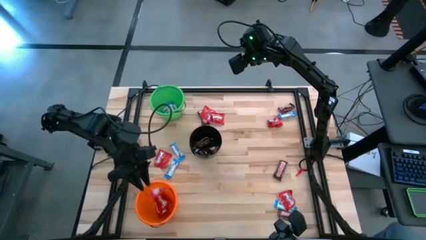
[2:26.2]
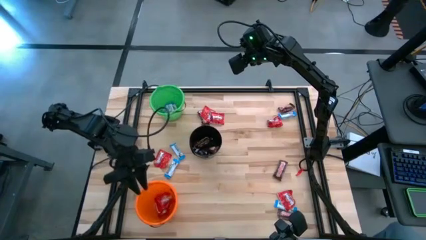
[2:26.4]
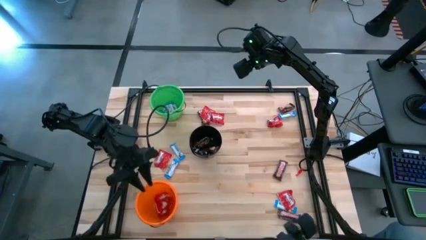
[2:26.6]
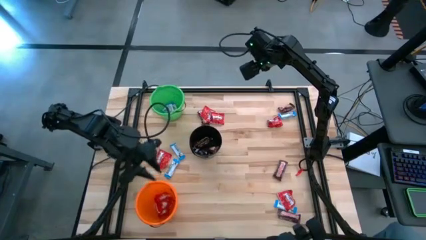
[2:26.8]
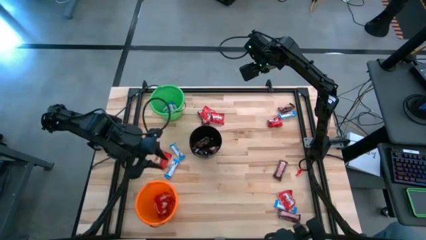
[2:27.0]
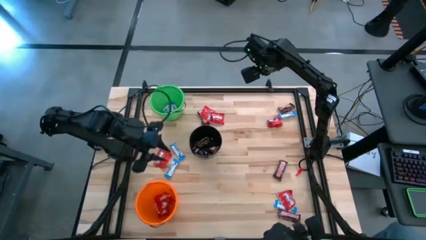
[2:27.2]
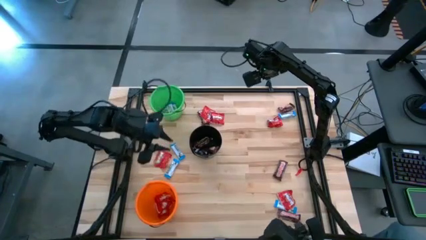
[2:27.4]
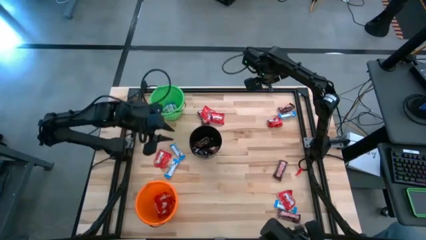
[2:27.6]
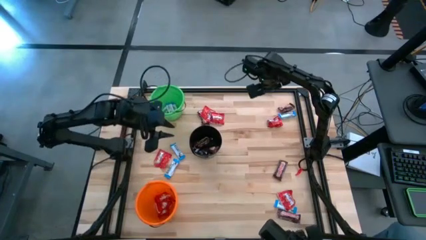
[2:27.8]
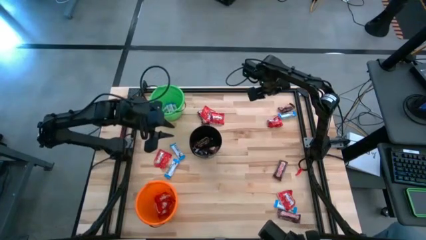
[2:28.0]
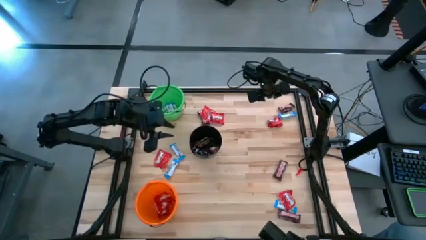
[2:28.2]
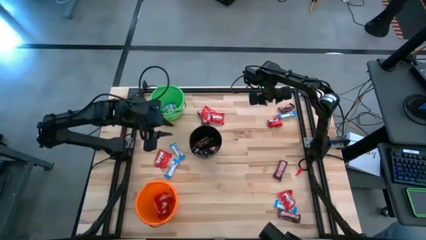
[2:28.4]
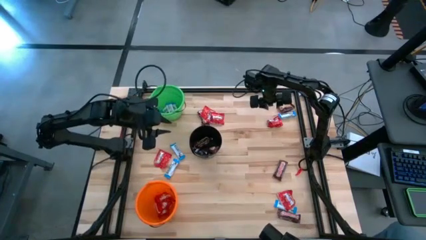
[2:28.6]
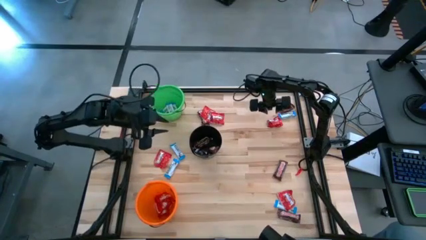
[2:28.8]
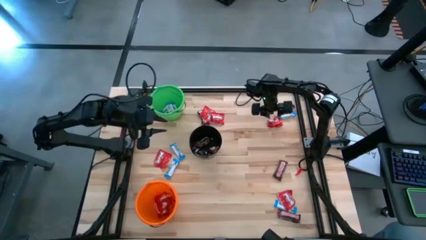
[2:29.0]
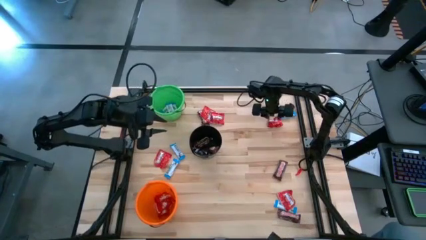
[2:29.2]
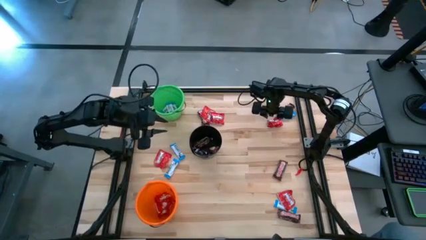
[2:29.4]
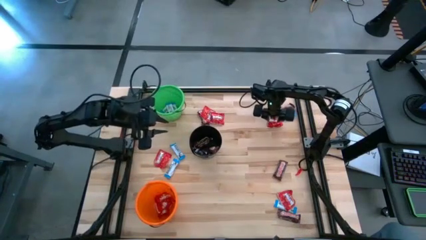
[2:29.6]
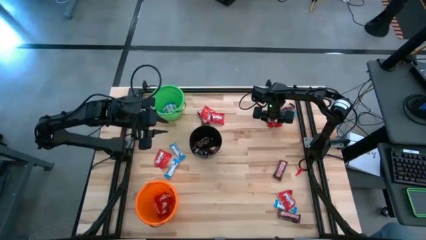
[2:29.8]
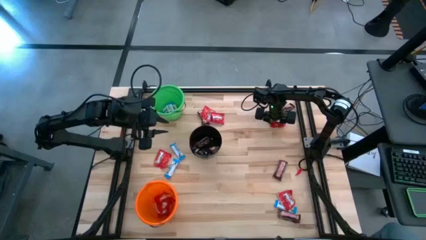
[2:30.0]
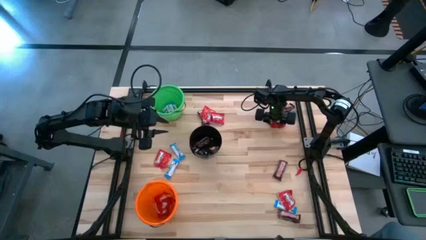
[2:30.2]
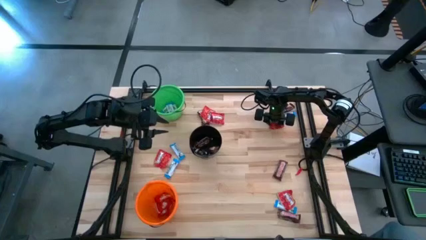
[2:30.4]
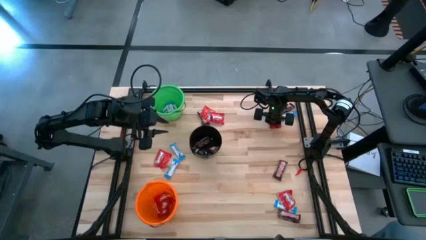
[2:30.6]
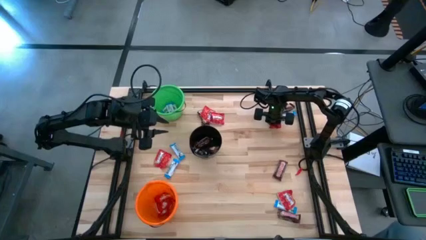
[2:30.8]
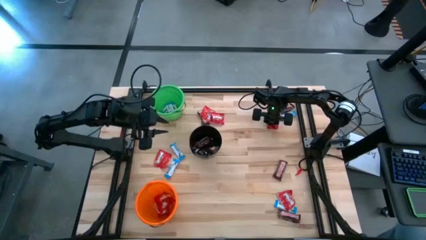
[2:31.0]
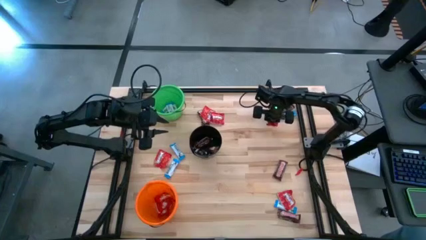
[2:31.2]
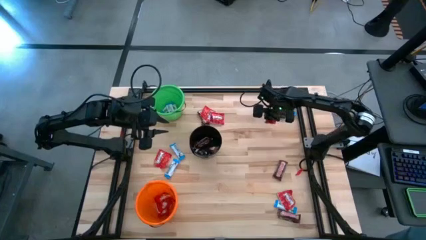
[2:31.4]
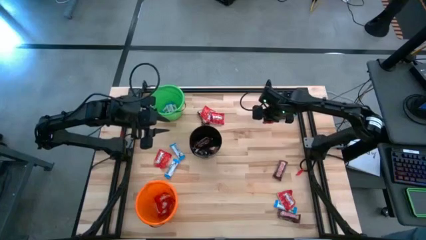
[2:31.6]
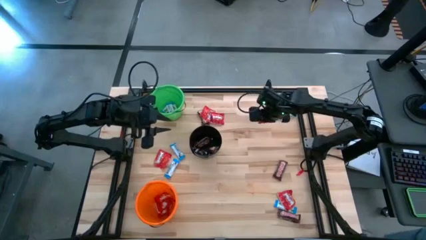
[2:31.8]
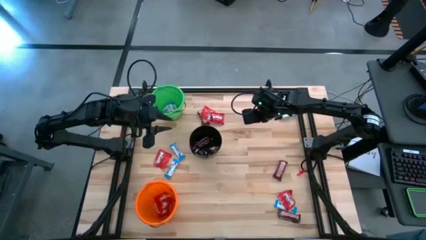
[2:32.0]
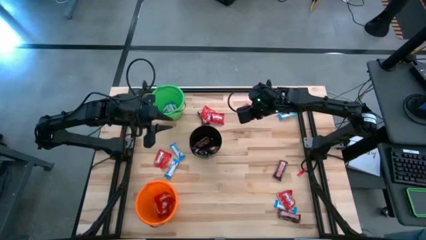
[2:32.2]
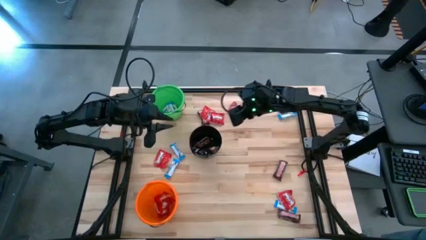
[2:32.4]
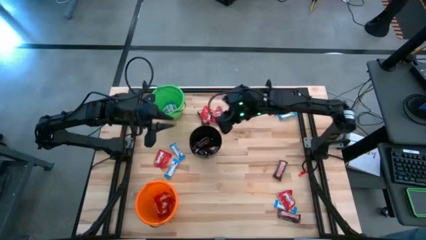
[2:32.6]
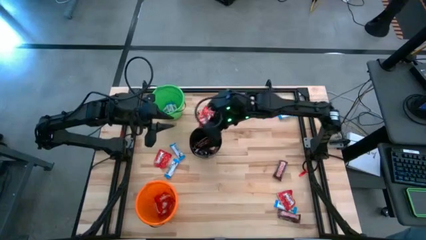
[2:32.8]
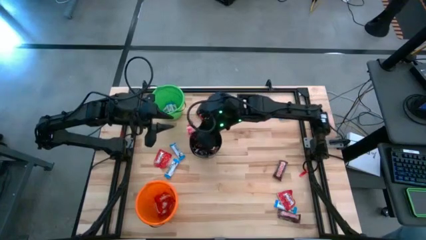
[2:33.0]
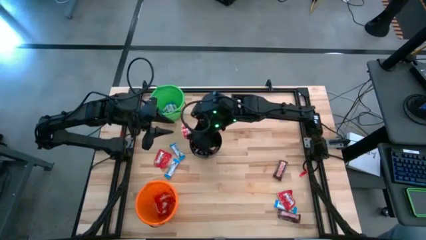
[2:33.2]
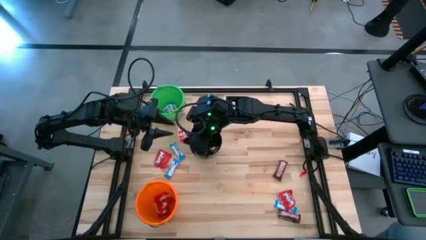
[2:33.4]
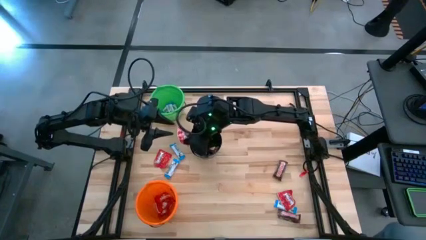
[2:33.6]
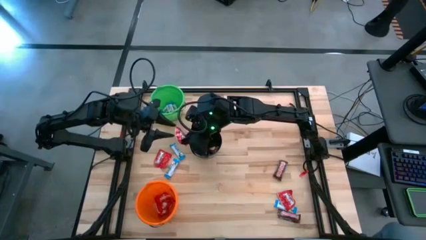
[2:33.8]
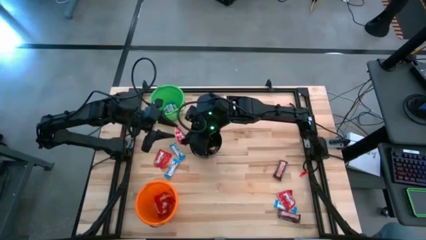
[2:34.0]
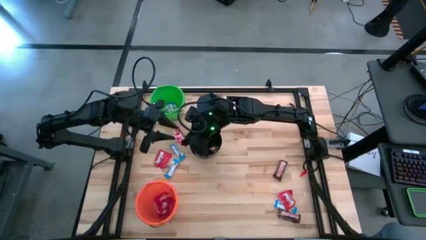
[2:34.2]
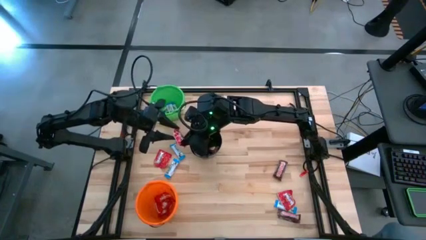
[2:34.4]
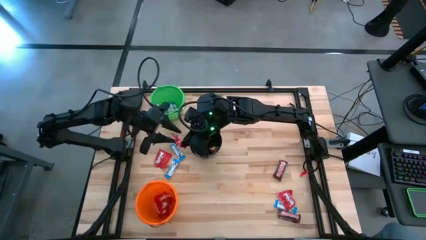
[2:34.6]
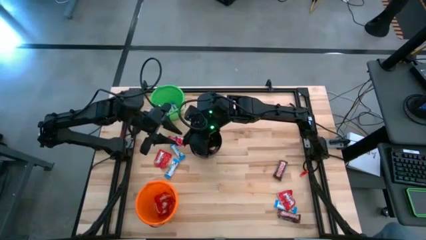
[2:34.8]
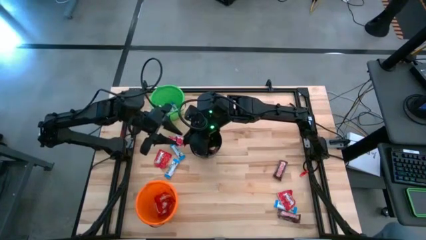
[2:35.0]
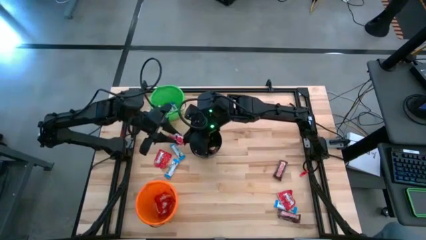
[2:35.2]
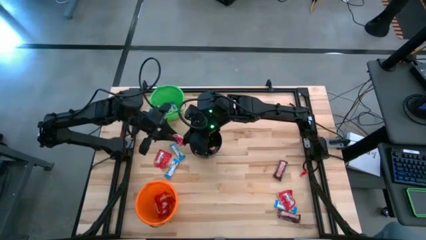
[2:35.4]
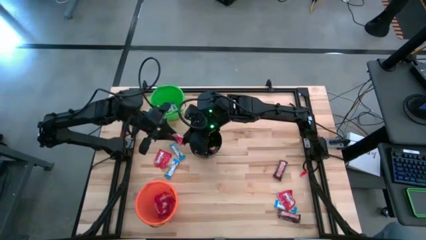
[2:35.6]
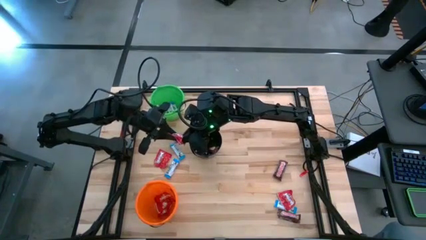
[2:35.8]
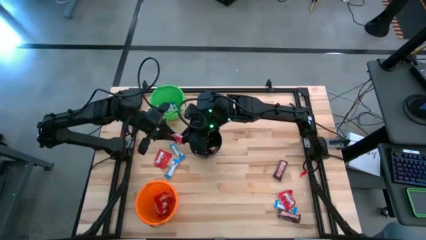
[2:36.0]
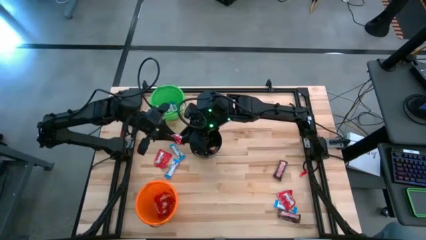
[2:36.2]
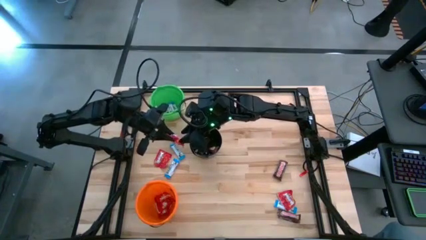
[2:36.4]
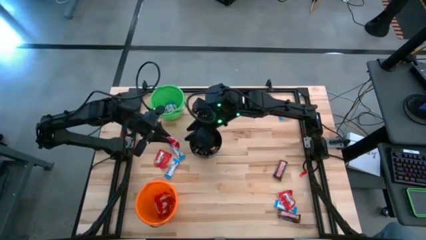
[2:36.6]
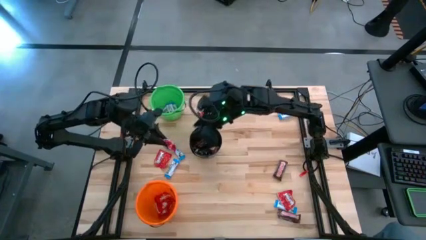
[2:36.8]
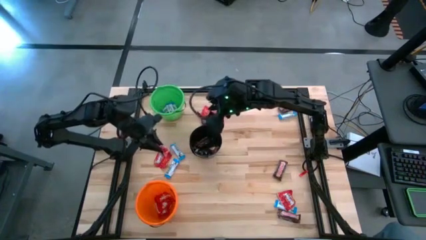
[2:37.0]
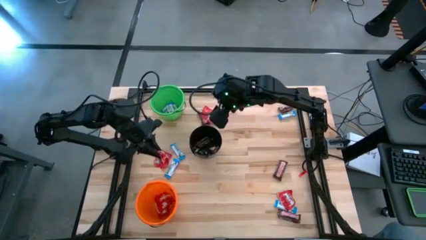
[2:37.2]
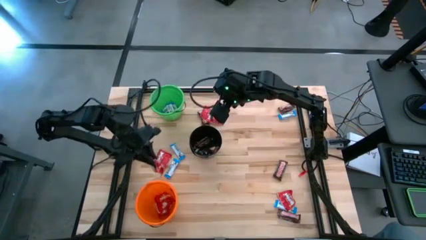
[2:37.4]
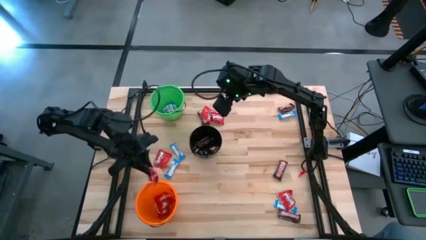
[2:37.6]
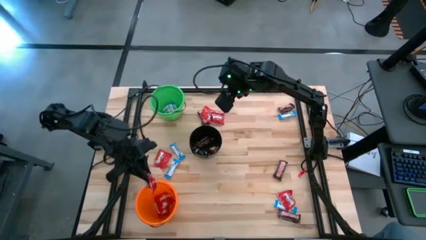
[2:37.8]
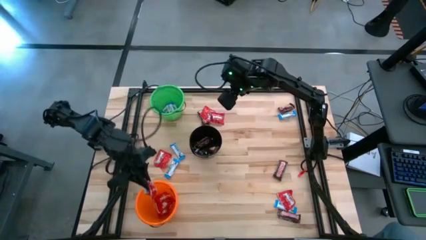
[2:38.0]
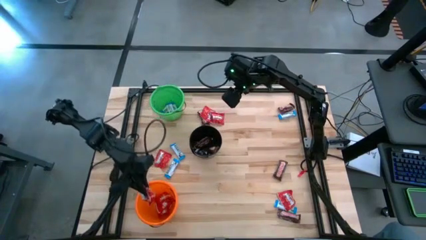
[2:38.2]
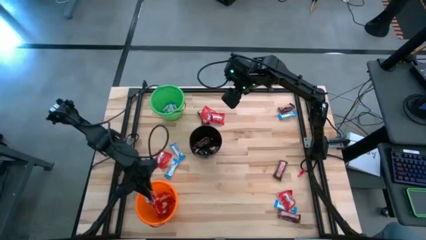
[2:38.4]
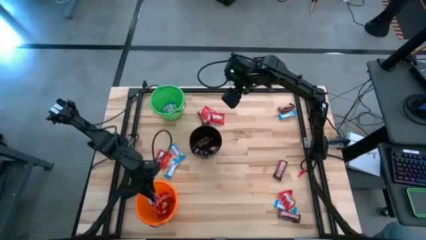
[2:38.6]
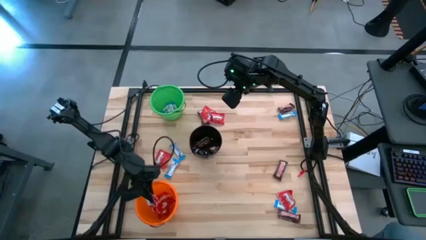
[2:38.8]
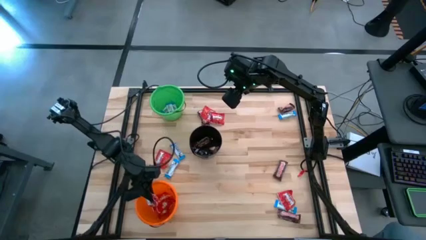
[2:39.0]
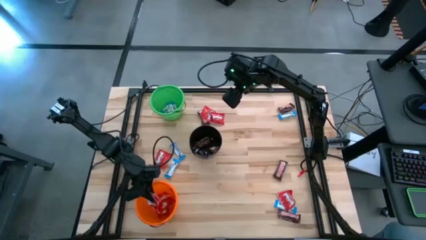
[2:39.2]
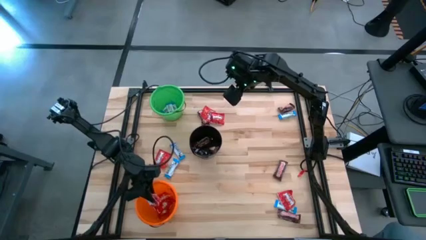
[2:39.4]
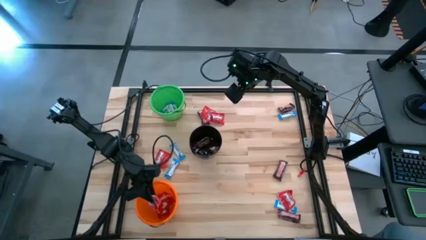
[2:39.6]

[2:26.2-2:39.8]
Task: Sort candy
Put the red candy pack into the orange bucket

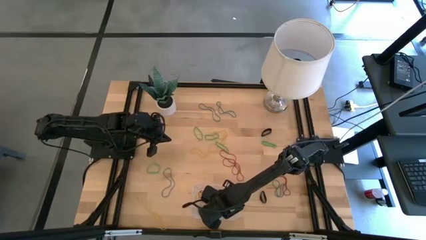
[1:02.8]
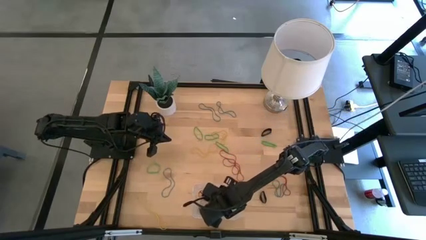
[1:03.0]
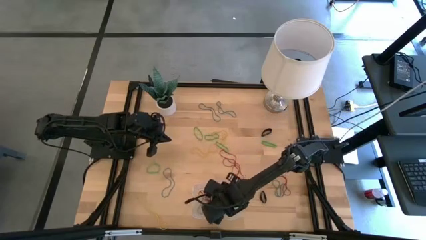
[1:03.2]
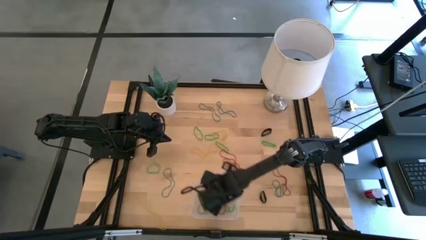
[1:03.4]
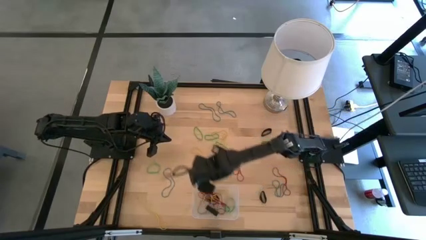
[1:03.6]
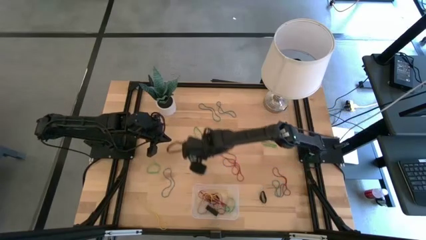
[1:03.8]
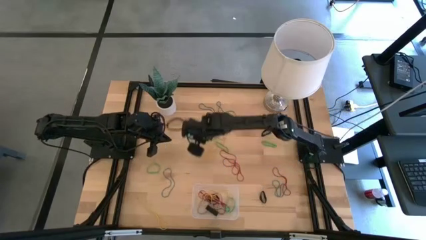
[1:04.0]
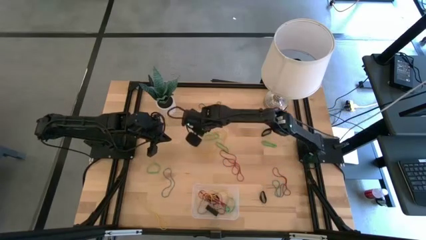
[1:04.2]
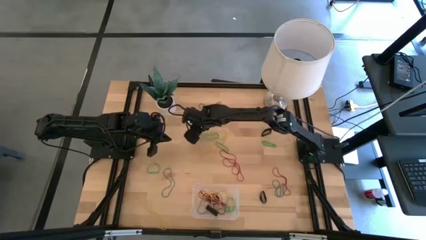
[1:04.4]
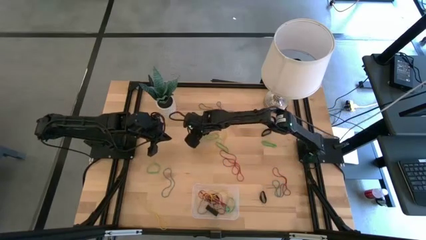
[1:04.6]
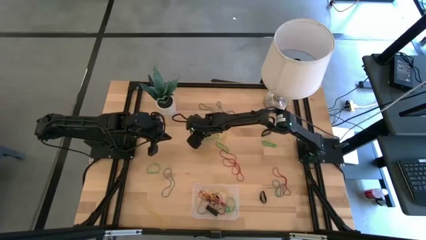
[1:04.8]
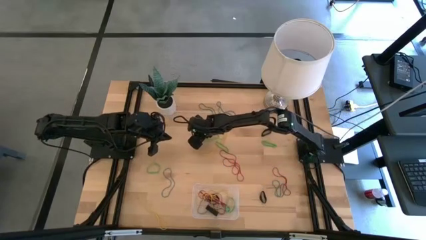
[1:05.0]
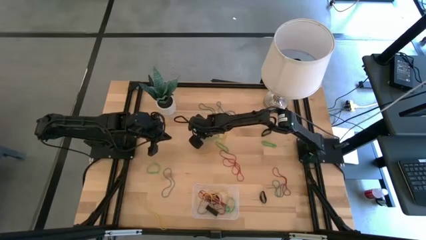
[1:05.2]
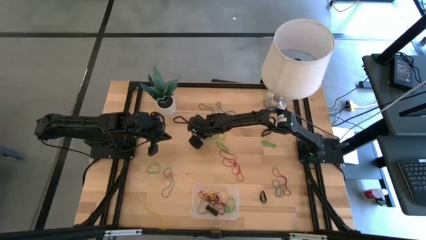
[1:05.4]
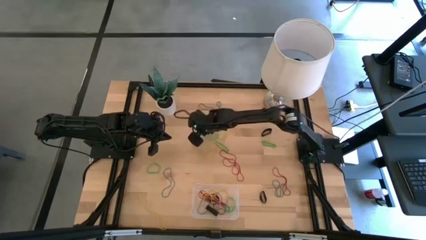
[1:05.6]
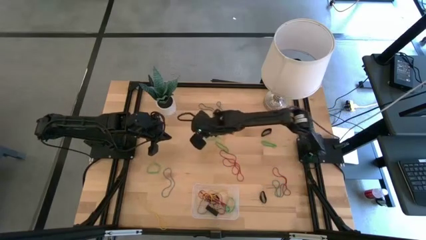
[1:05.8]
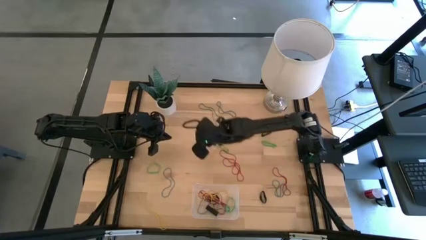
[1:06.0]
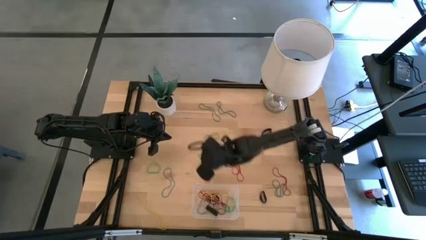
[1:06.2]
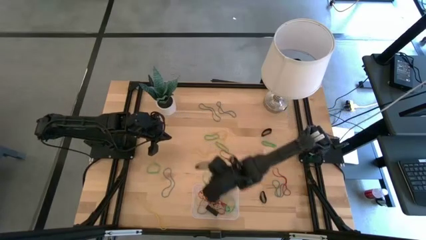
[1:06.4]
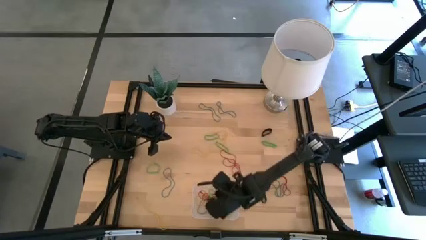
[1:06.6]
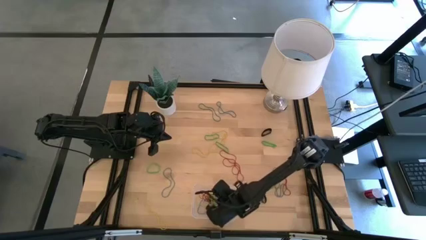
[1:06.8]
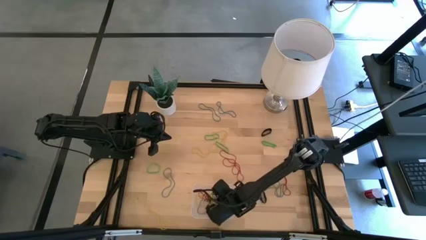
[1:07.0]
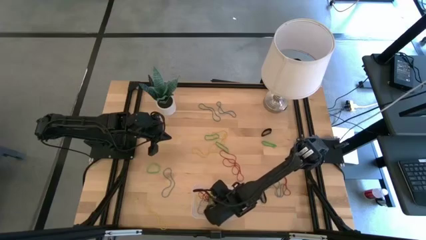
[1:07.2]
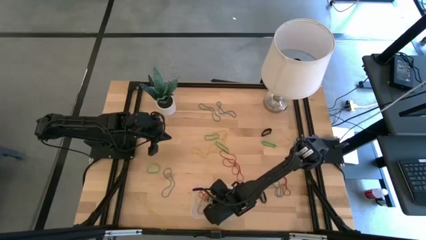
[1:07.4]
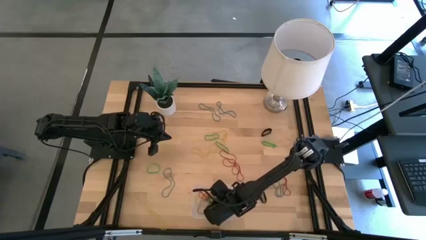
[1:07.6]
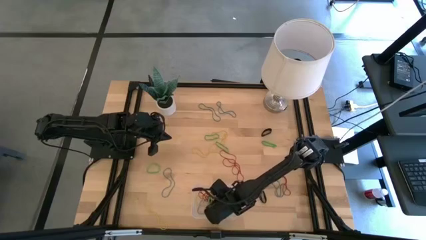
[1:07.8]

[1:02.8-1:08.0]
Task: Pick and place rubber bands into bin
Put the green rubber band into the transparent bin
